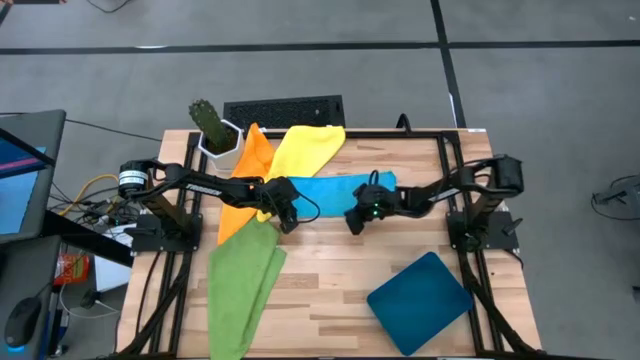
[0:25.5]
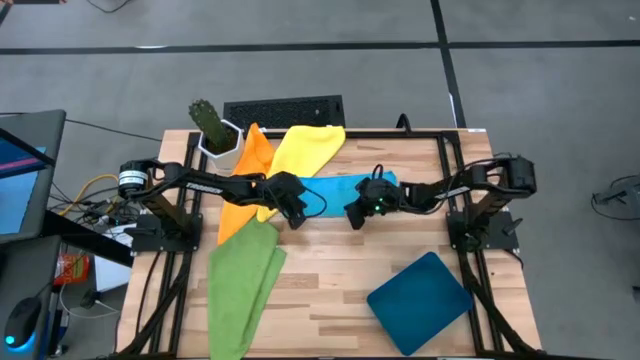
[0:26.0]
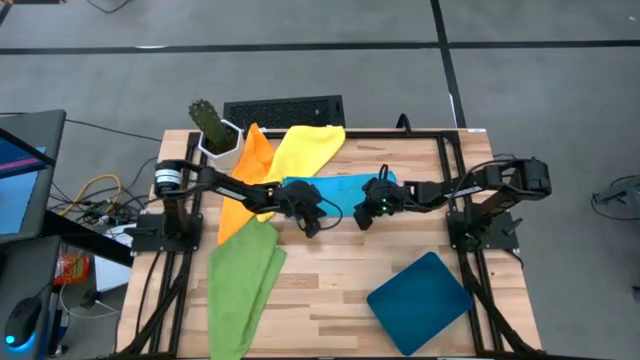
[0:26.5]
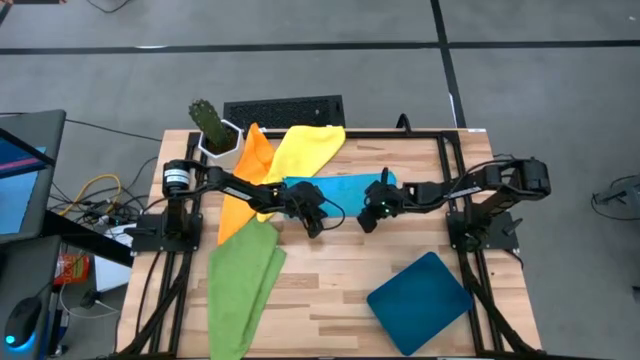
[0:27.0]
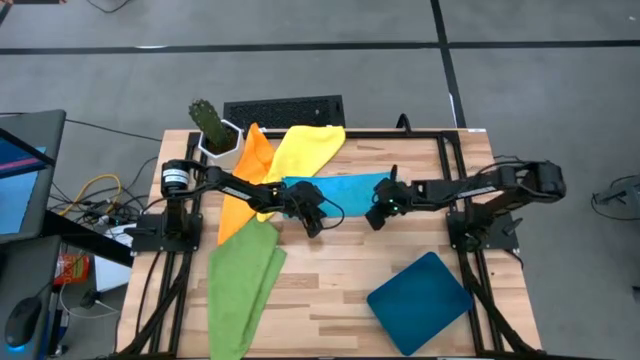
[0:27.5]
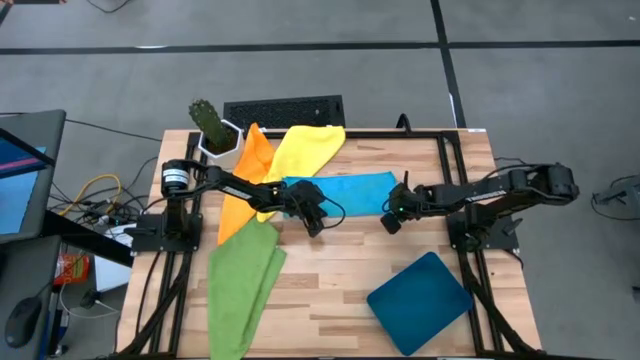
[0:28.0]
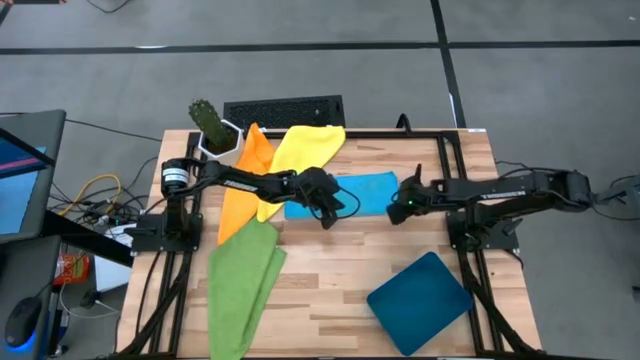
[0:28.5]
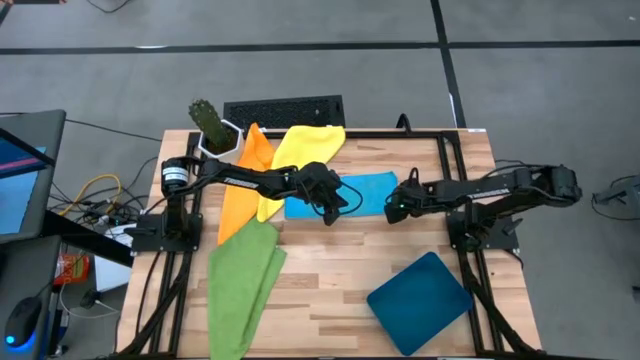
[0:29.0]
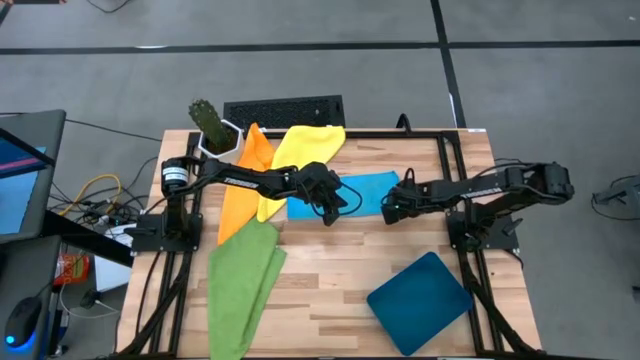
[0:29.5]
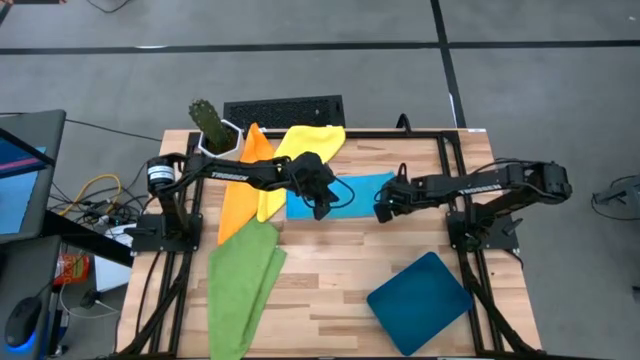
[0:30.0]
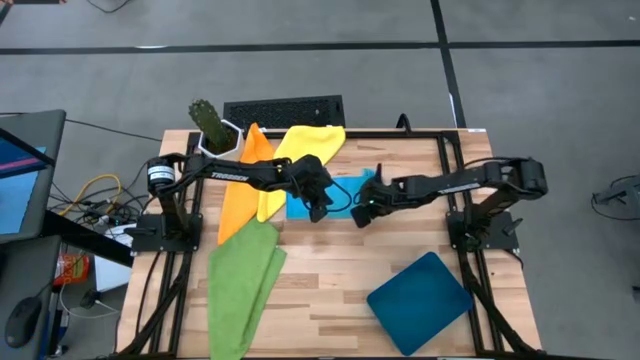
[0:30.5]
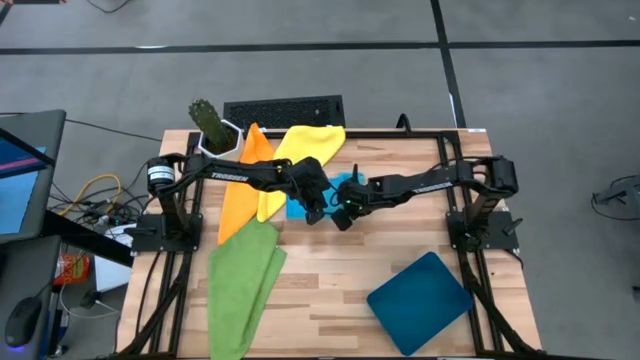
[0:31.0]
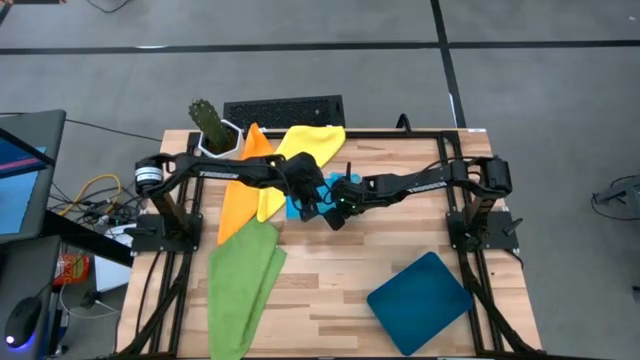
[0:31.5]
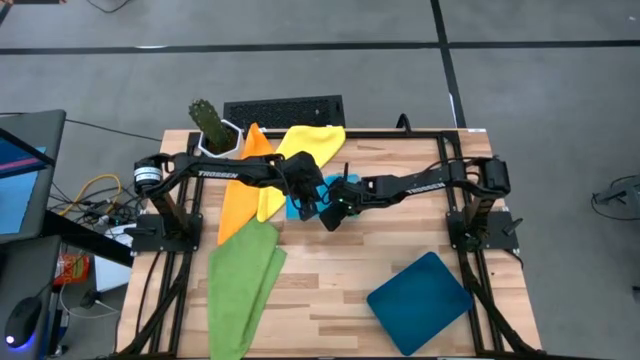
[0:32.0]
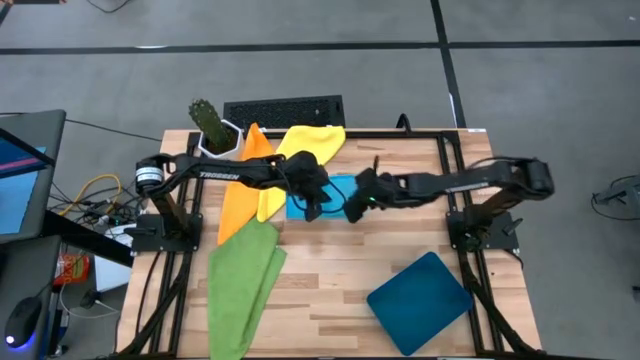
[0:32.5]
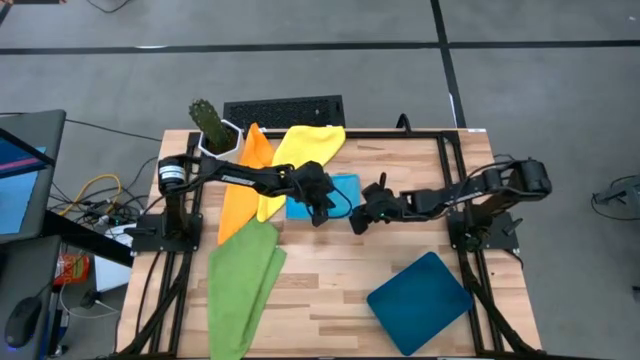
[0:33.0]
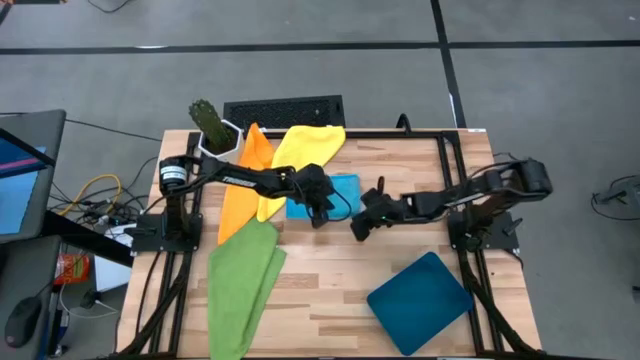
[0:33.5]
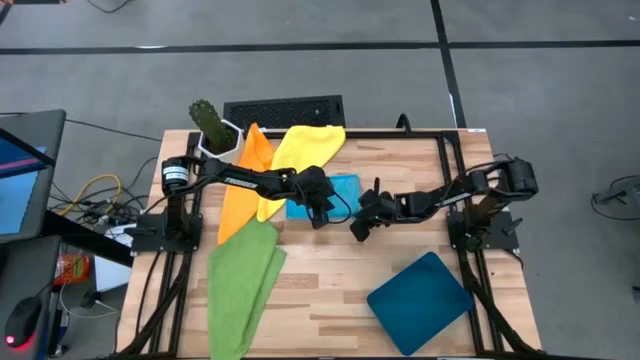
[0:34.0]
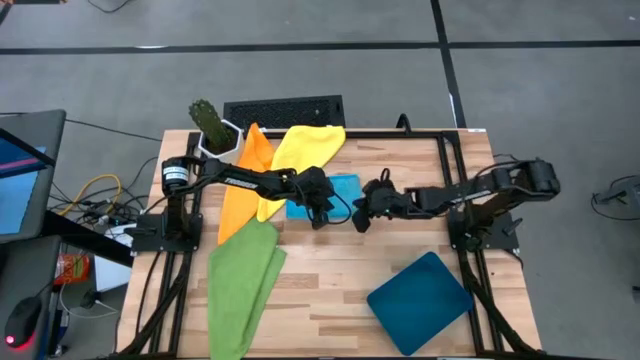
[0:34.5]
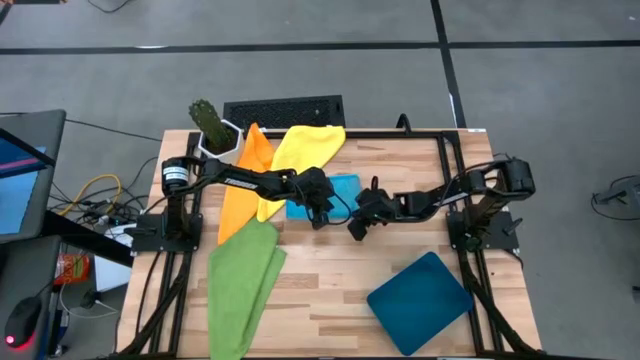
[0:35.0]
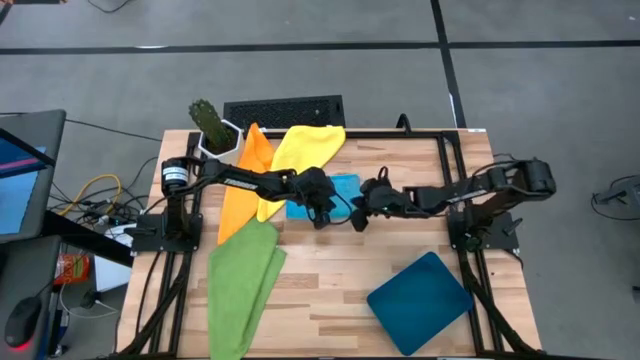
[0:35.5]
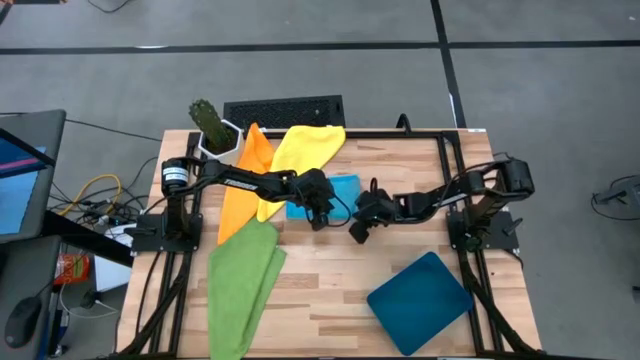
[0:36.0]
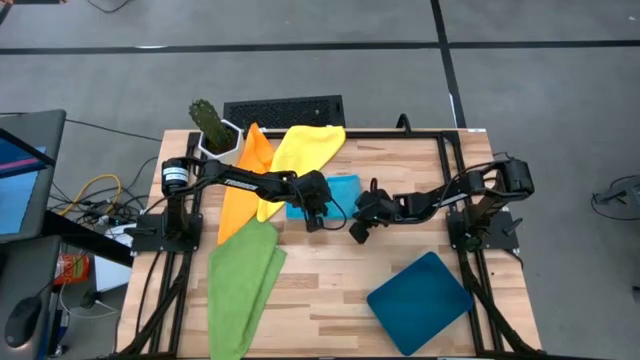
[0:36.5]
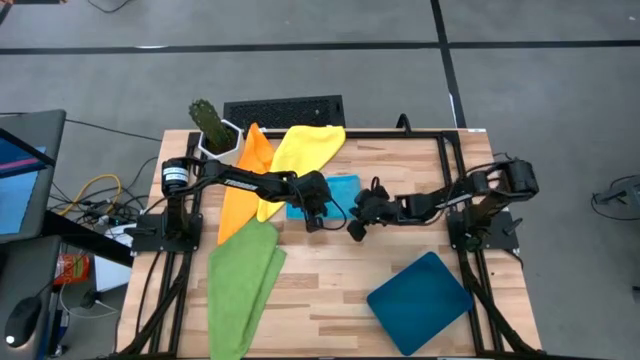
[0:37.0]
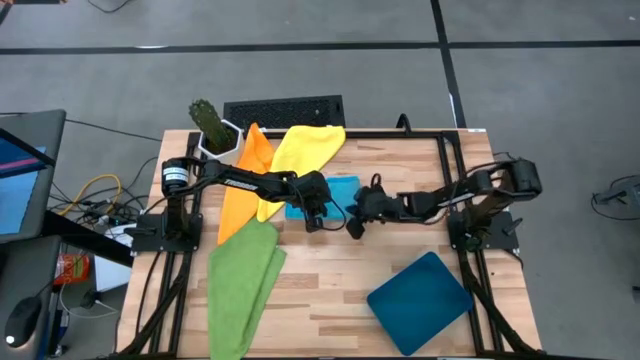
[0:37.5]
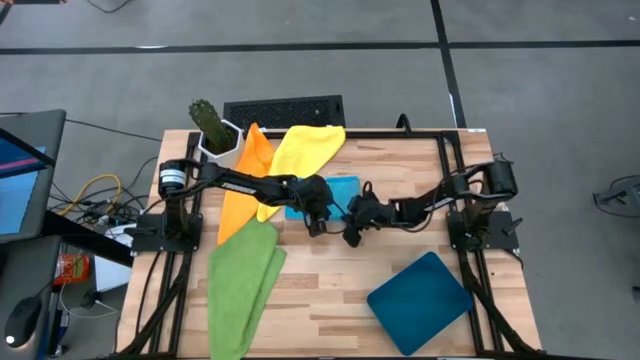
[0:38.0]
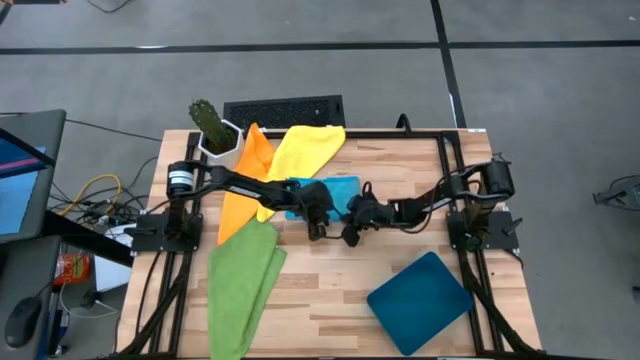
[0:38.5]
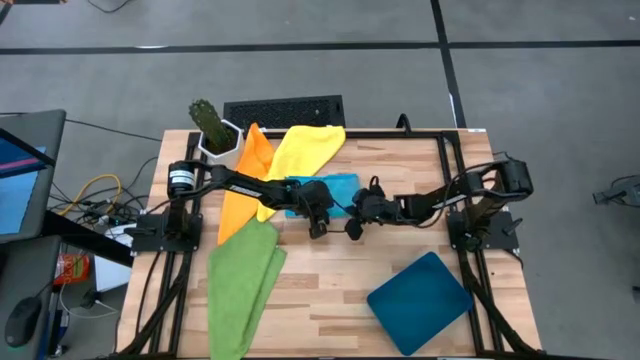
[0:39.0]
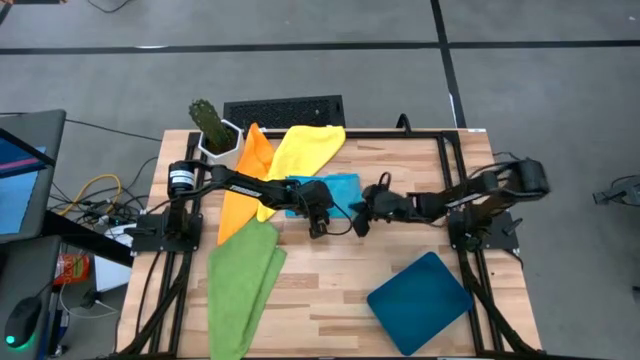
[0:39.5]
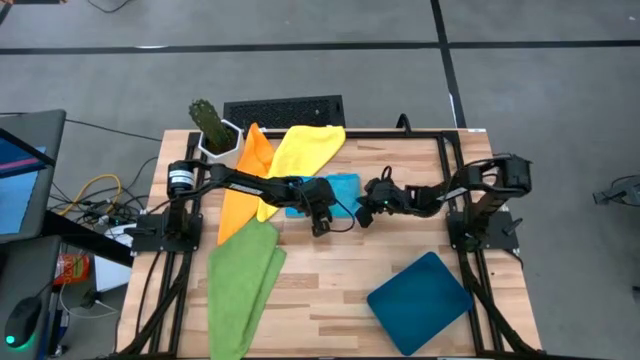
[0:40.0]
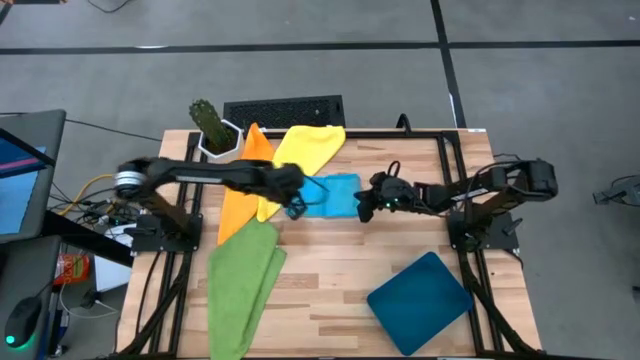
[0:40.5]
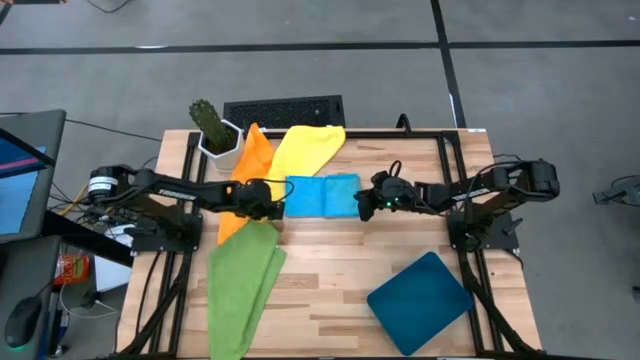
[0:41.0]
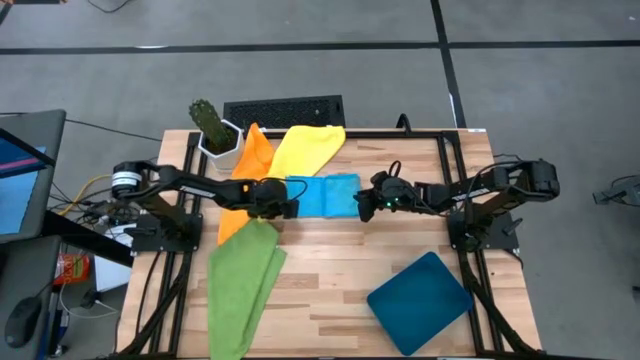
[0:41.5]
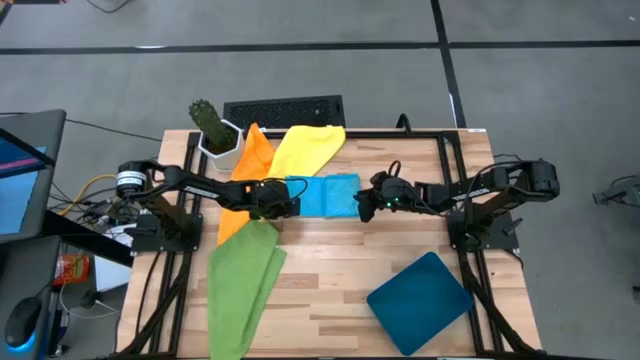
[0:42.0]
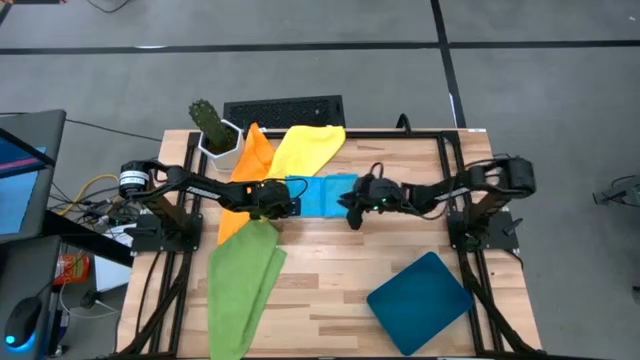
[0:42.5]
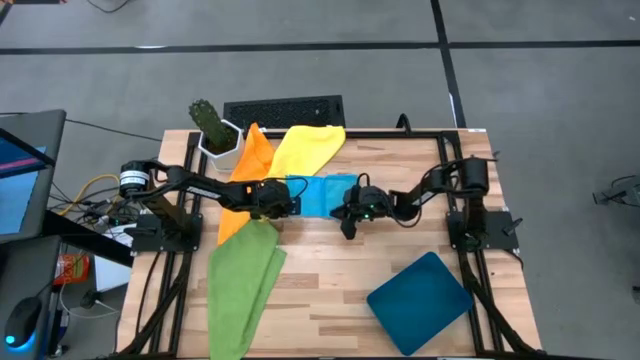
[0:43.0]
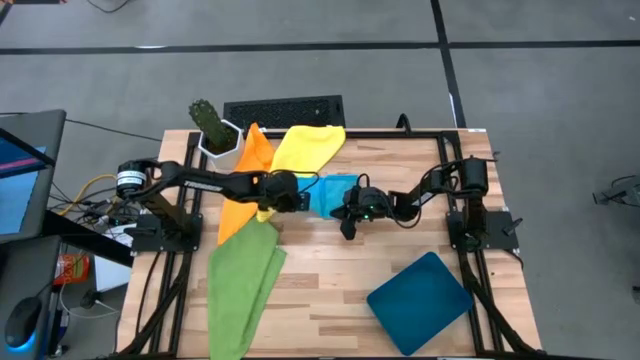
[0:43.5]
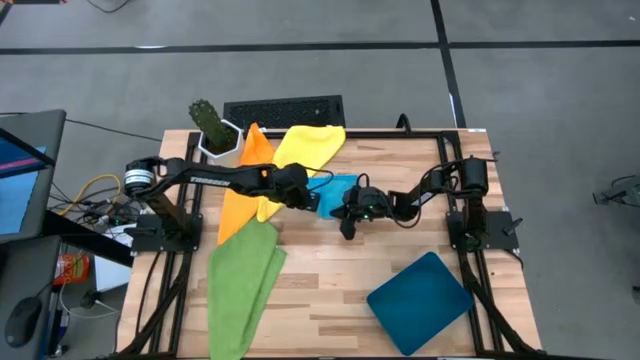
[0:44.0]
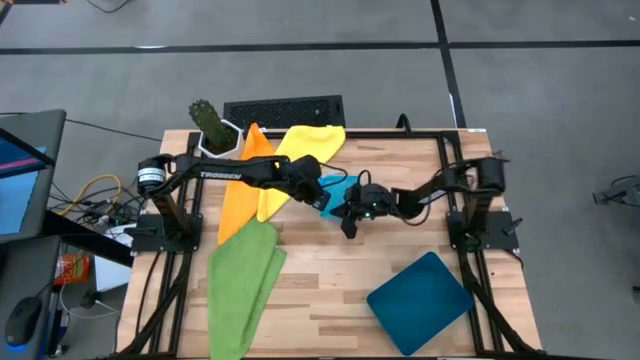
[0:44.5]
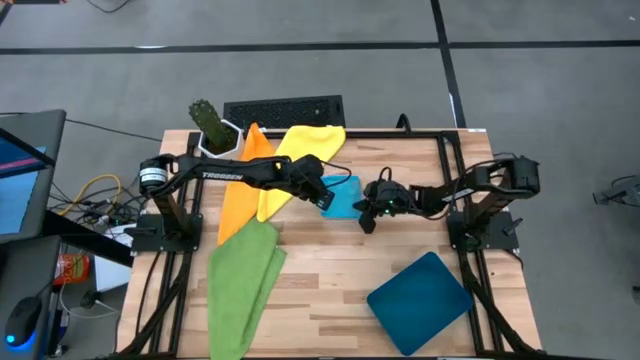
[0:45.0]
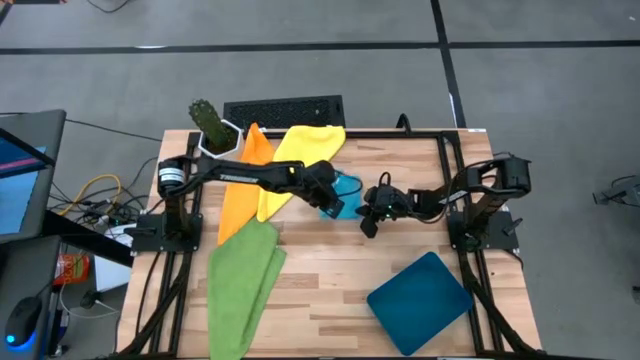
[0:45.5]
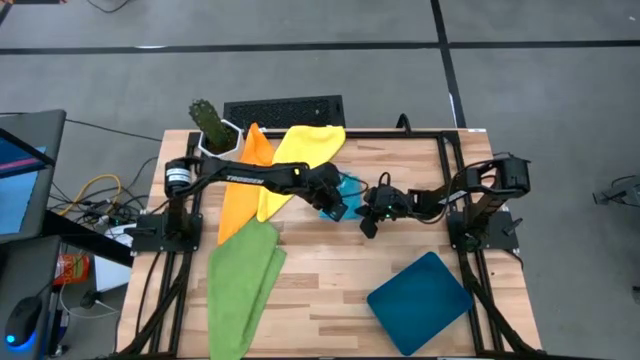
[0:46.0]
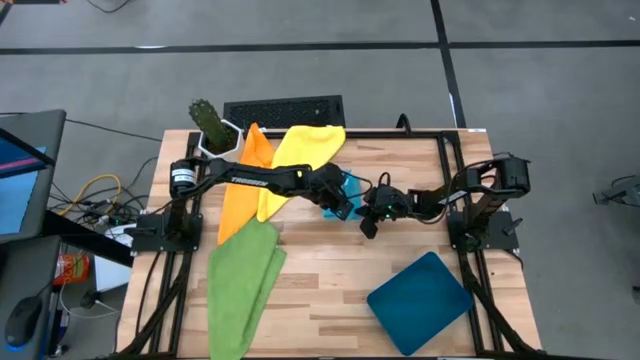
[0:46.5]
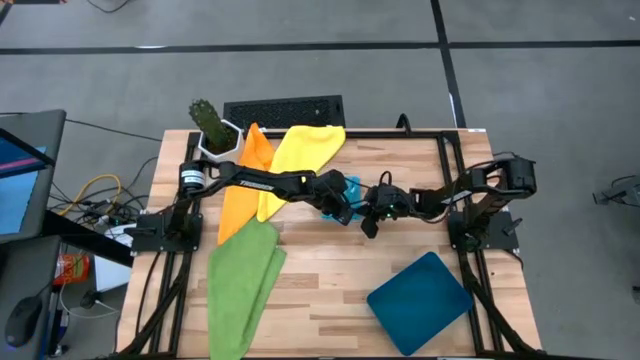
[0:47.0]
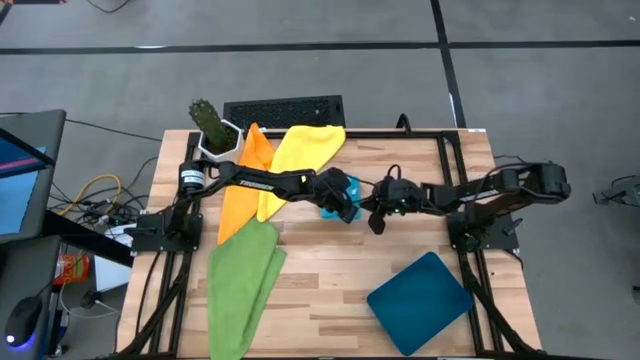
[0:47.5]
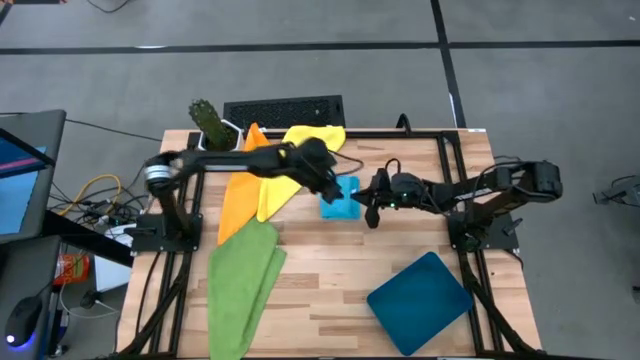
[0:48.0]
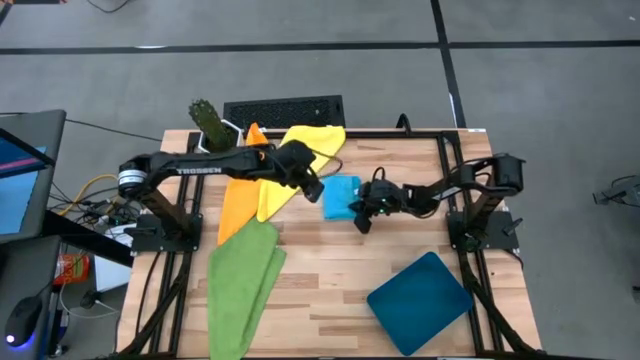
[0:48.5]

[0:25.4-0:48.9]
Task: Fold microfiber towels
Fold the blue microfiber towel
